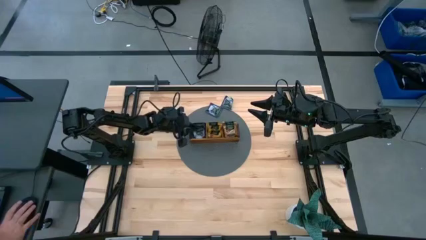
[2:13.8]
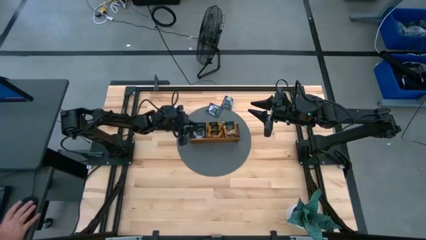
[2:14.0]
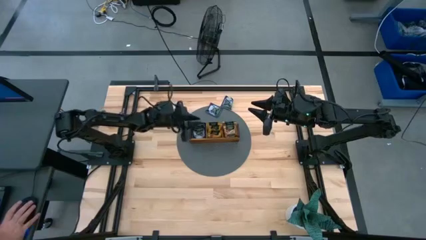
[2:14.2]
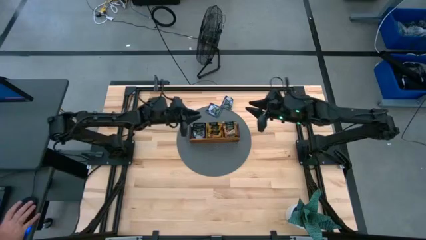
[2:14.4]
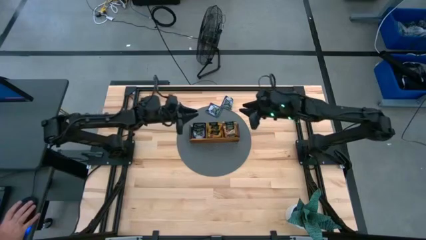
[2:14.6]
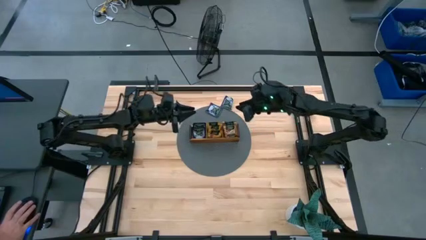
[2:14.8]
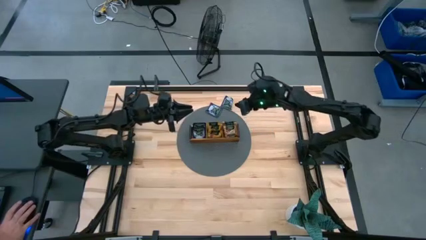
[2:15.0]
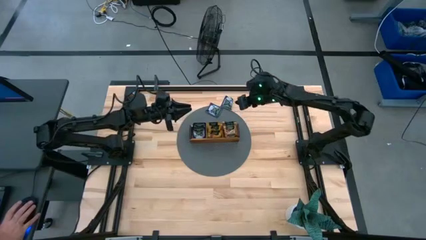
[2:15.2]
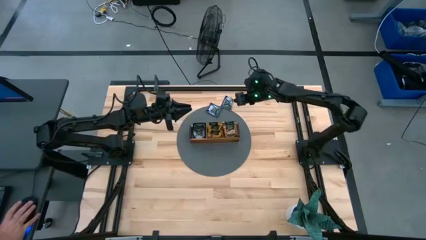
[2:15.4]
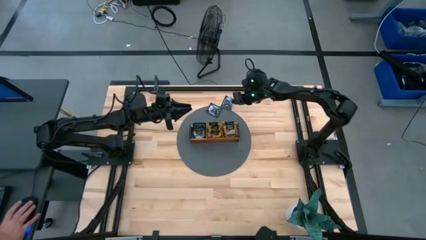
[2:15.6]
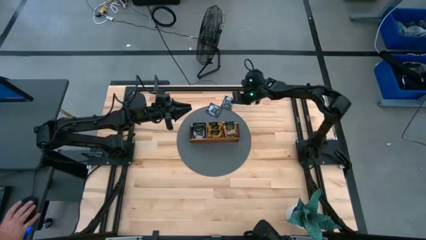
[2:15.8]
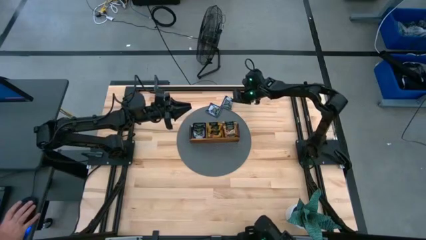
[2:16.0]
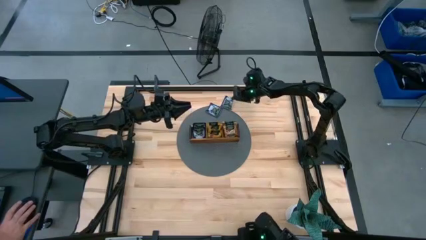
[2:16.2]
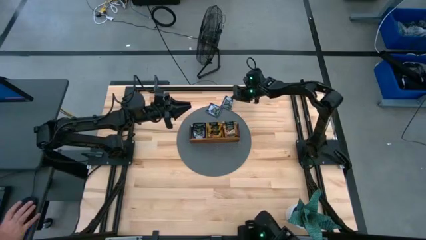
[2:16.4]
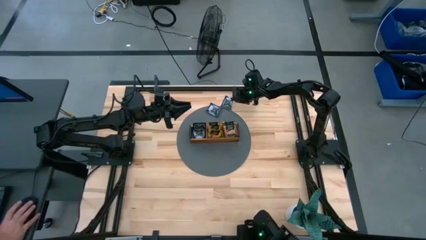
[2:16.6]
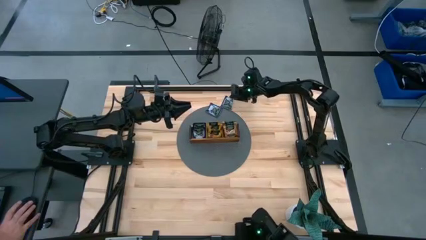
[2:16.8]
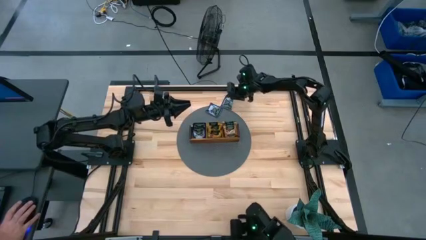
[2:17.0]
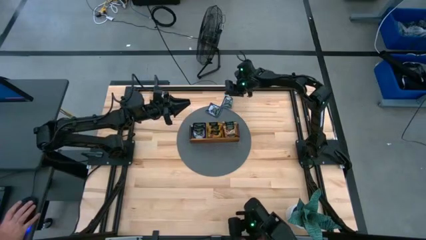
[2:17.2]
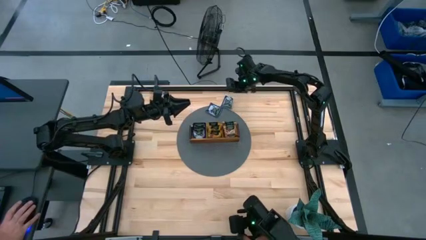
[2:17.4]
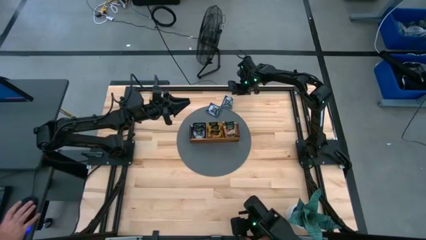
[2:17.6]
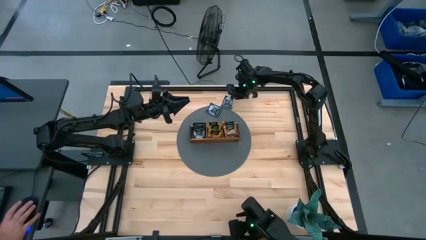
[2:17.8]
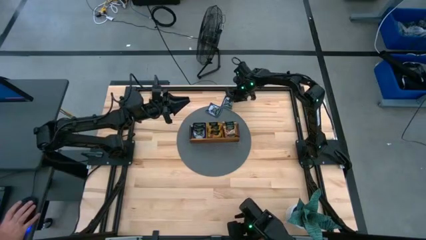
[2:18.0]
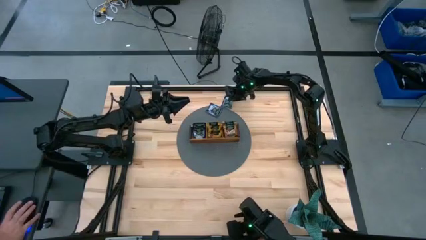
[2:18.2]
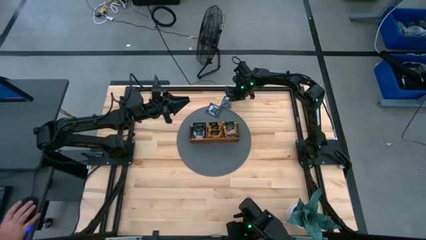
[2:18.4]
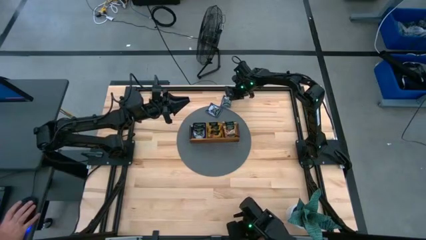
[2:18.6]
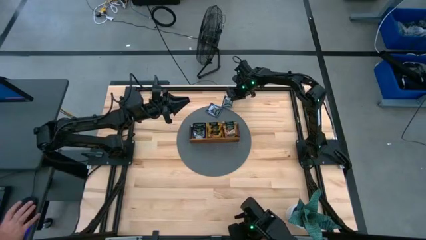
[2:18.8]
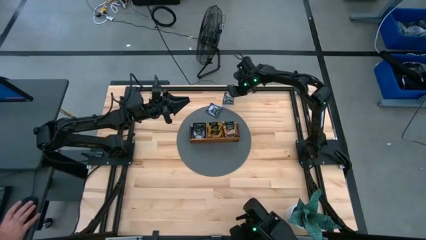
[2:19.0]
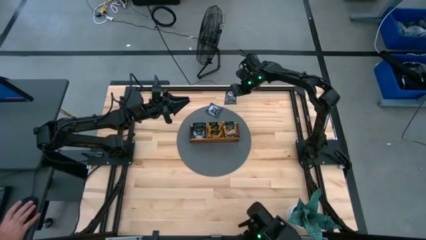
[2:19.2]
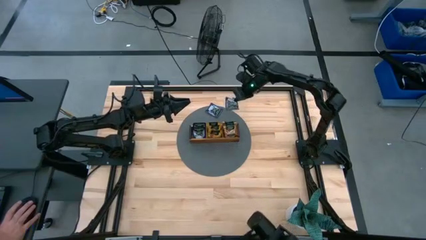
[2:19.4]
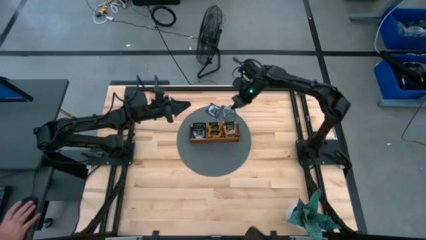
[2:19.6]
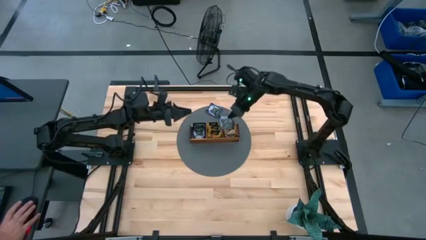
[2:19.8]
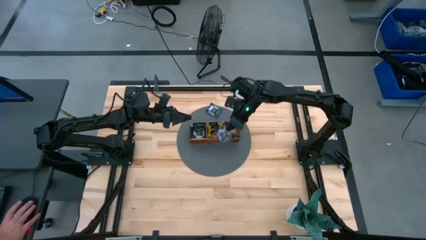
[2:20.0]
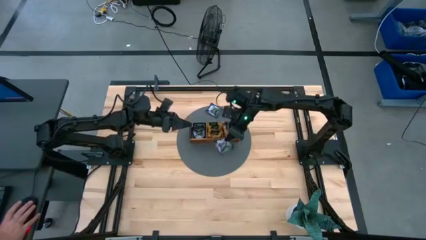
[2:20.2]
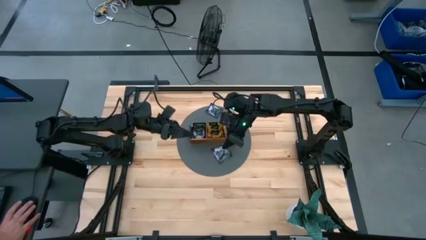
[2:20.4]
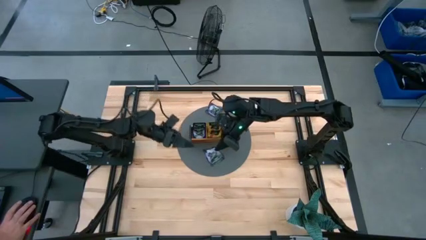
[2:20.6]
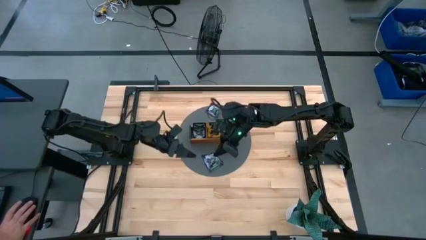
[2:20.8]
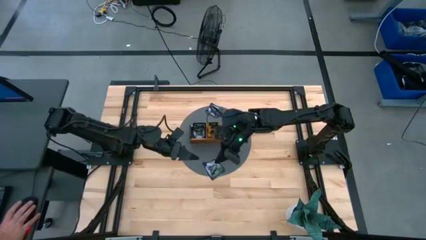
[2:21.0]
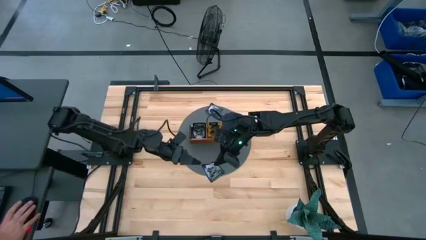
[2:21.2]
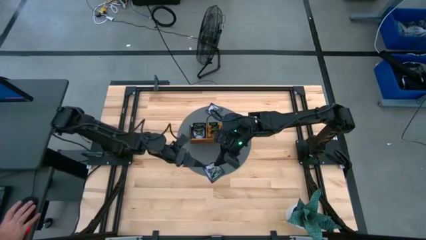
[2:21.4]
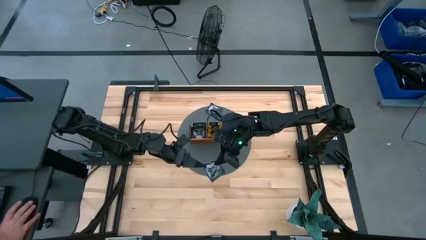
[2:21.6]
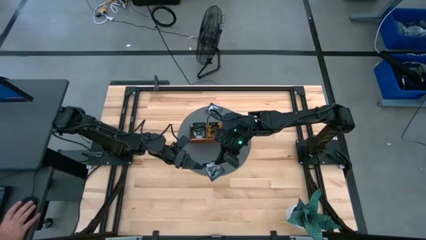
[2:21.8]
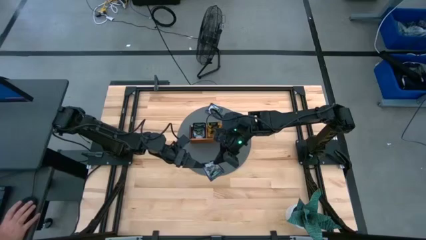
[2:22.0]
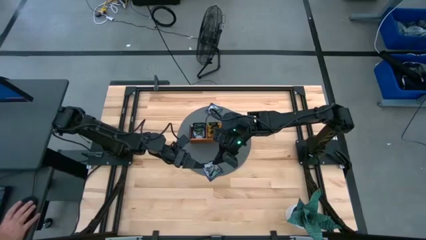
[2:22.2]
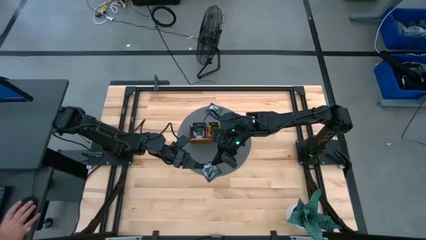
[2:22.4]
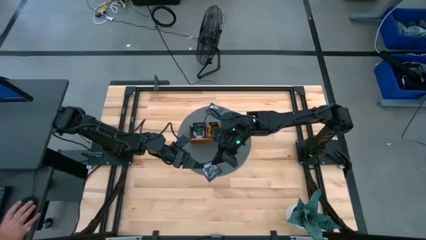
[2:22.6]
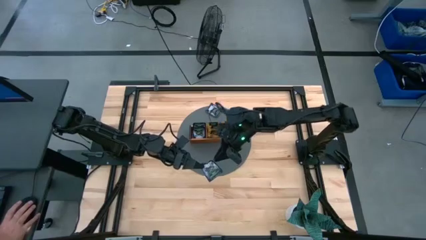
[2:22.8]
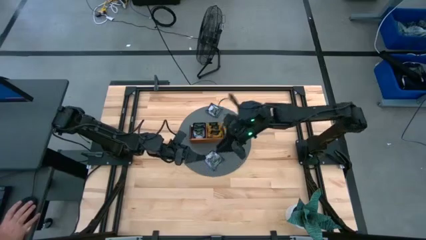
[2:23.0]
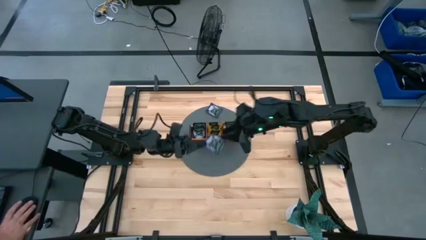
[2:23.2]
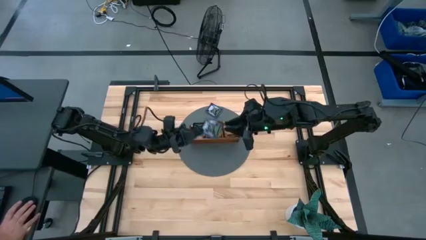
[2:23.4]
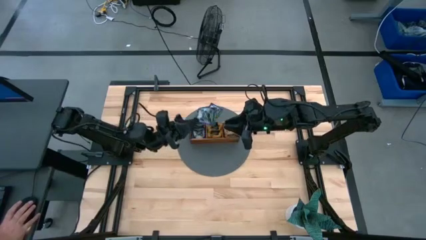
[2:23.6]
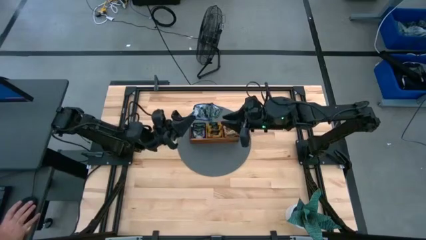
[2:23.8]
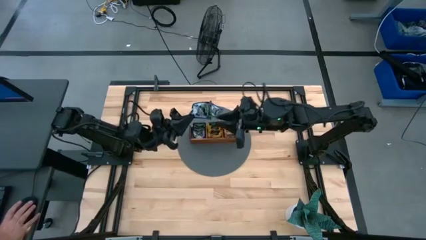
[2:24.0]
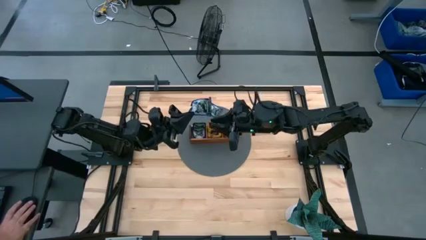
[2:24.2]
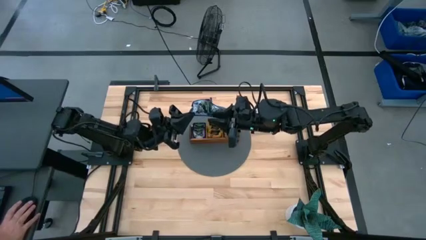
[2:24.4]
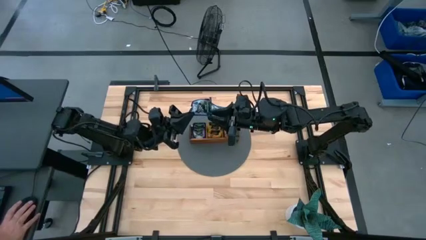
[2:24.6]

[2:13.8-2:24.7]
Task: Pick & Place Tea
Put the violet tea bag into the left section of the wooden organizer

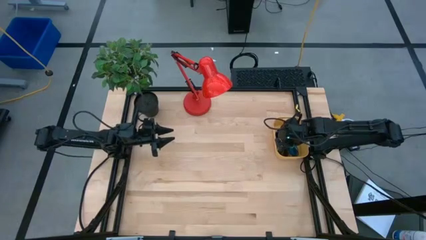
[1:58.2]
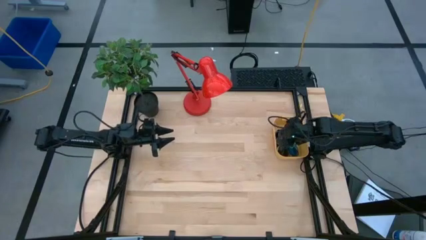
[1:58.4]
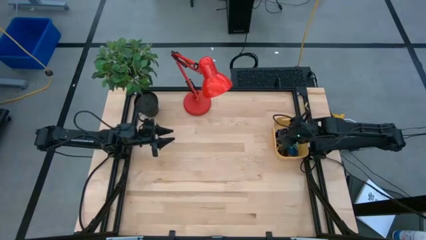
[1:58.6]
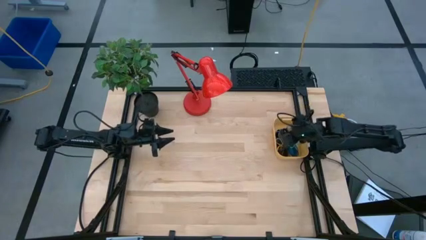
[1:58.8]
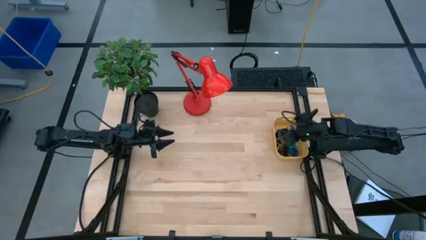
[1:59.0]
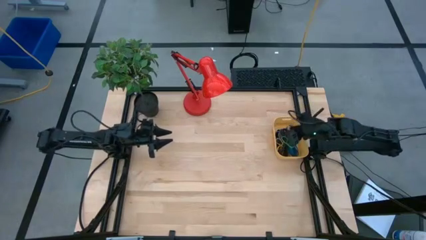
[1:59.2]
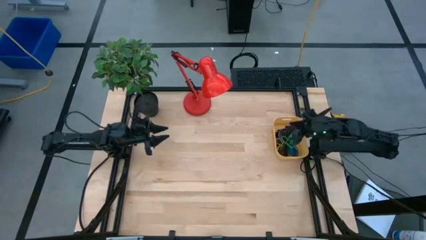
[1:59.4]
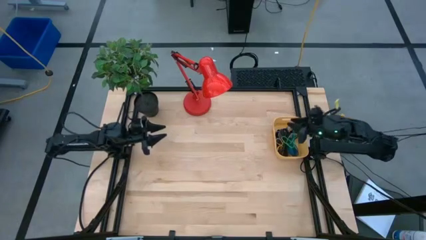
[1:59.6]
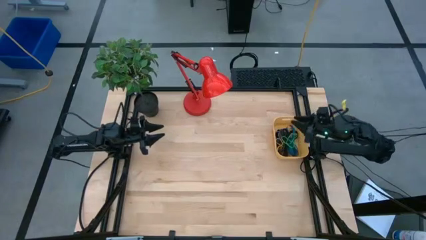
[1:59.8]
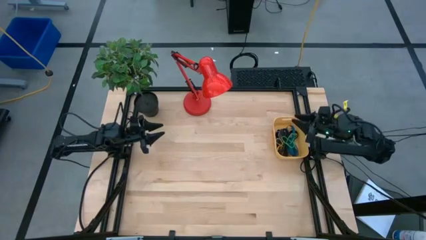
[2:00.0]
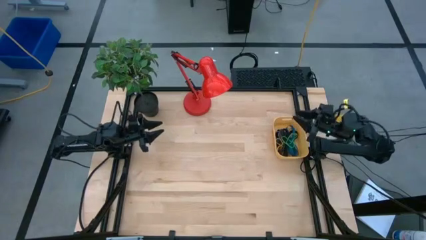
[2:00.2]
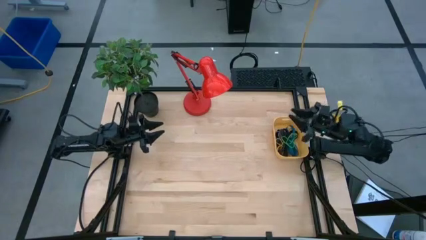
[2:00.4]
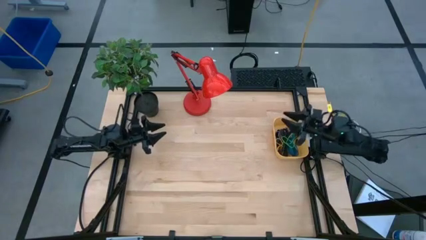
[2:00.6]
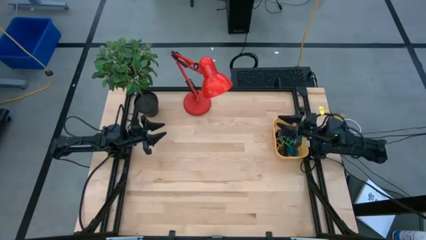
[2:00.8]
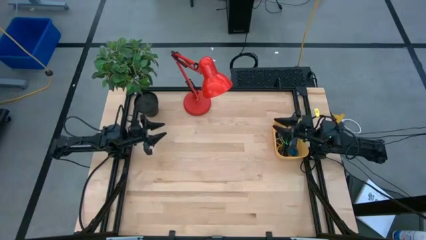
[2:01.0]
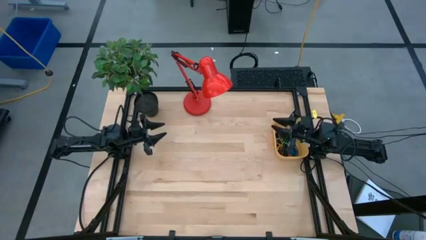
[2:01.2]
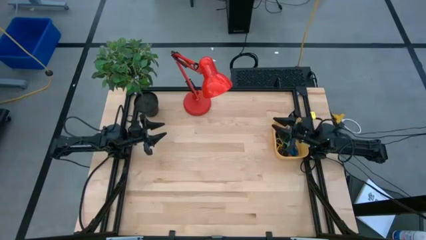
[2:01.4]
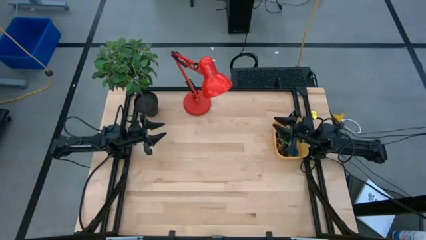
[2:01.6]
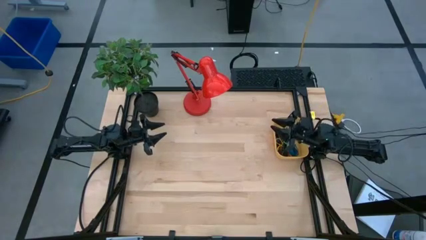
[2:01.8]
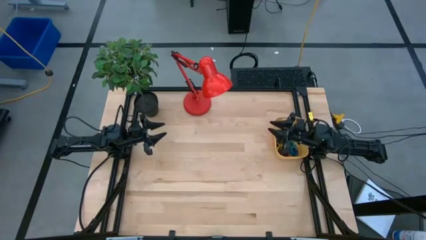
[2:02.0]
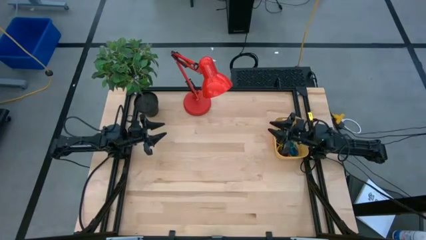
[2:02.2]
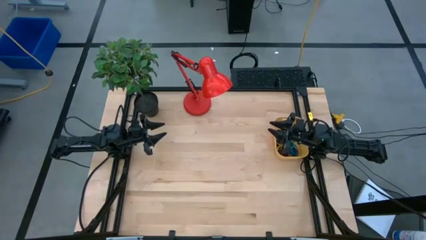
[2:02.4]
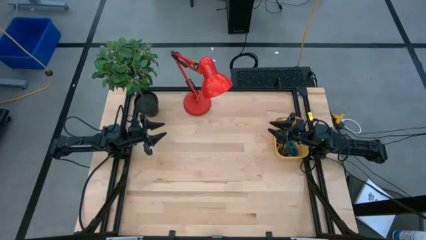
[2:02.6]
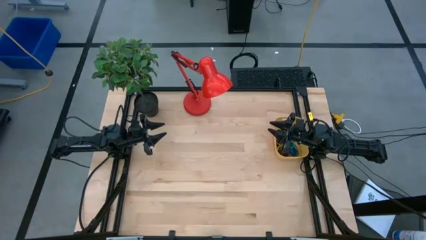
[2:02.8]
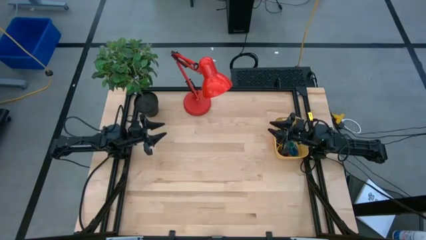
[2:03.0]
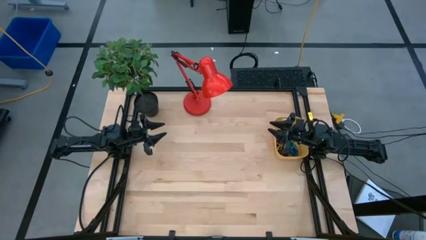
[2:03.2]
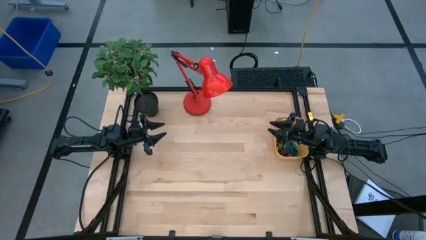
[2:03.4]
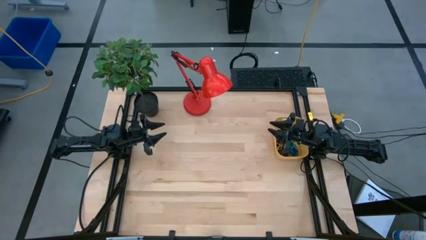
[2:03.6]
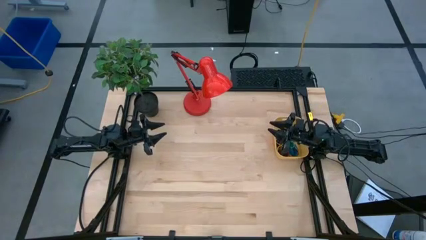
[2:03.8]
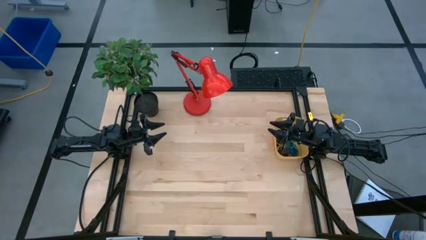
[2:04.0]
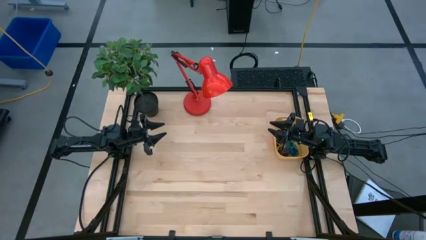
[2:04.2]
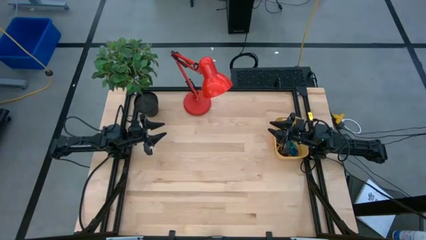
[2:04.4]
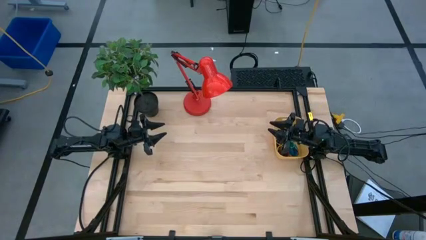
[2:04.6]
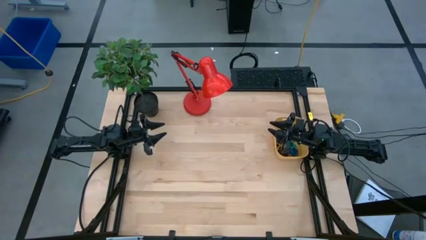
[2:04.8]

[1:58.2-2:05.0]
Task: Pick and place rubber bands into bin
Return to Home Position
